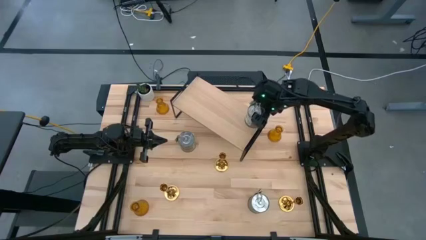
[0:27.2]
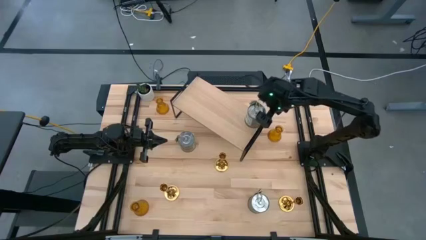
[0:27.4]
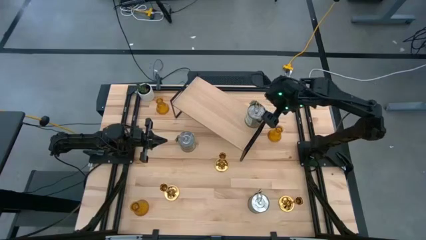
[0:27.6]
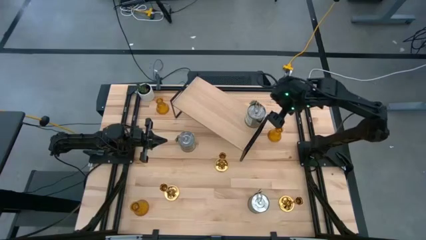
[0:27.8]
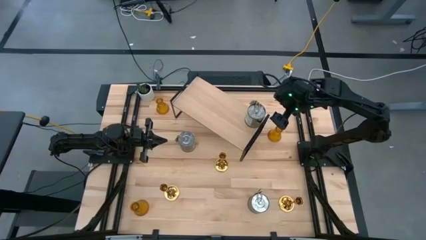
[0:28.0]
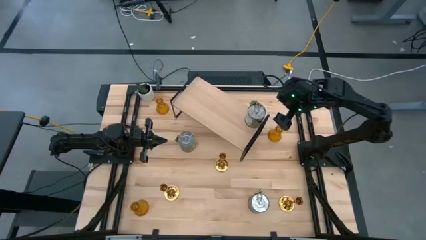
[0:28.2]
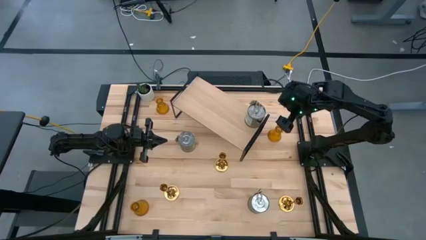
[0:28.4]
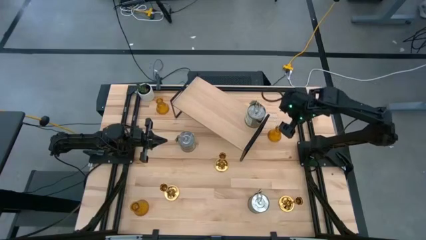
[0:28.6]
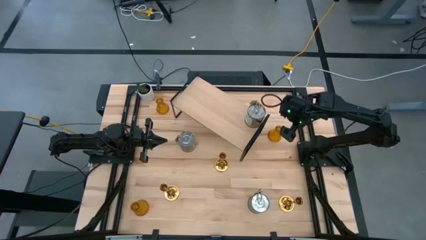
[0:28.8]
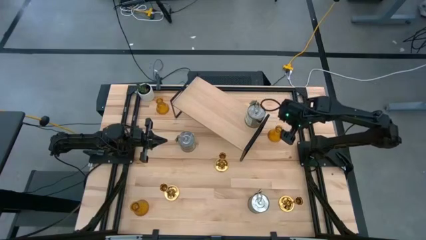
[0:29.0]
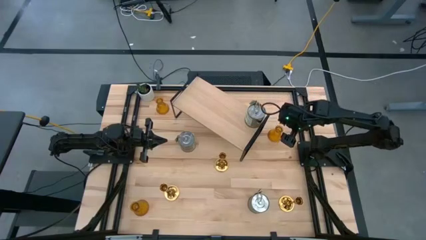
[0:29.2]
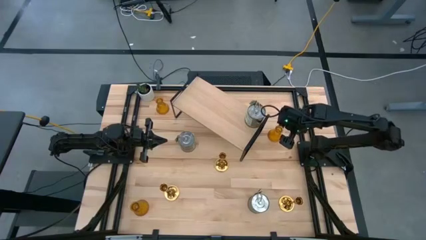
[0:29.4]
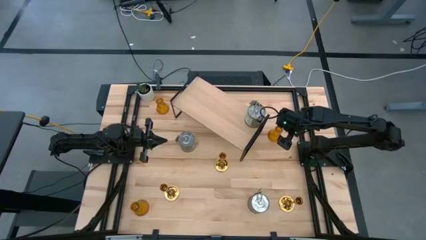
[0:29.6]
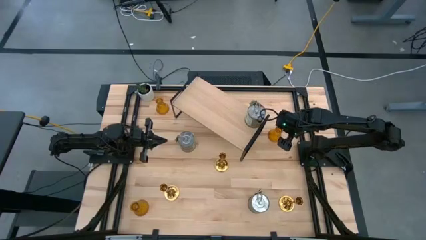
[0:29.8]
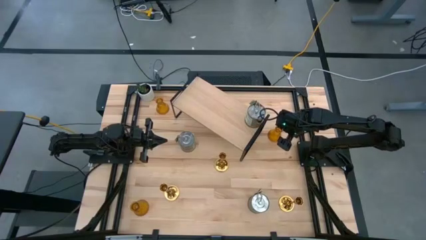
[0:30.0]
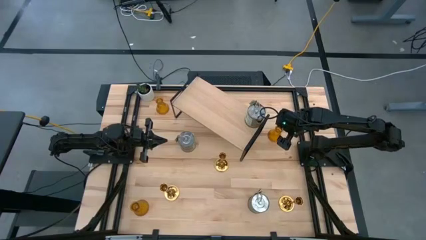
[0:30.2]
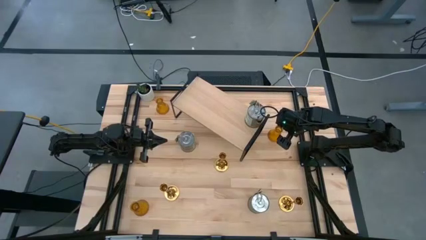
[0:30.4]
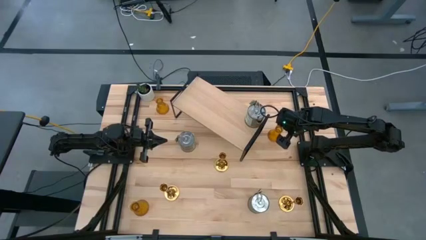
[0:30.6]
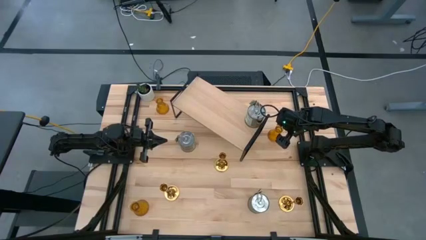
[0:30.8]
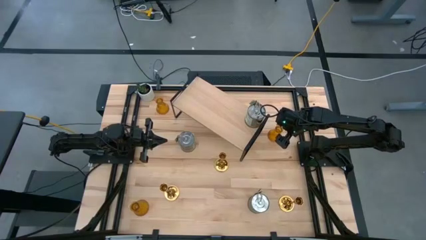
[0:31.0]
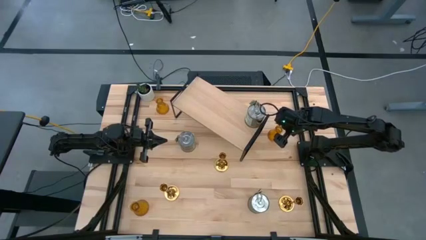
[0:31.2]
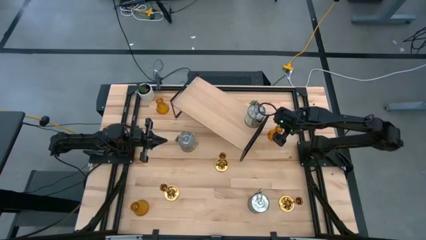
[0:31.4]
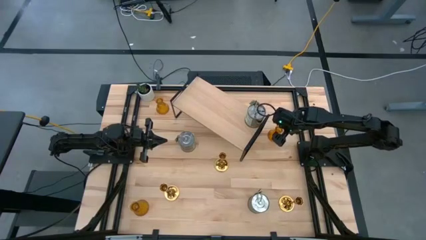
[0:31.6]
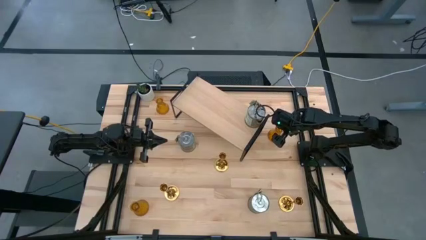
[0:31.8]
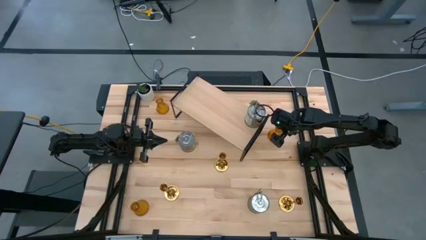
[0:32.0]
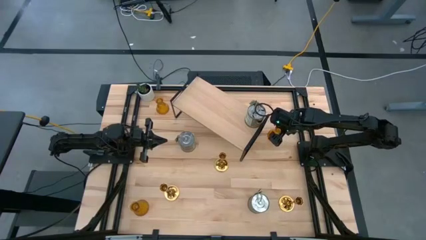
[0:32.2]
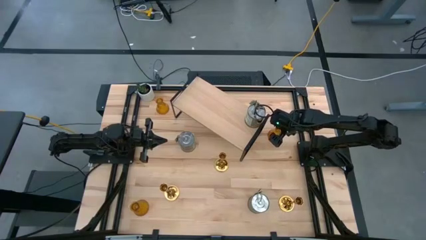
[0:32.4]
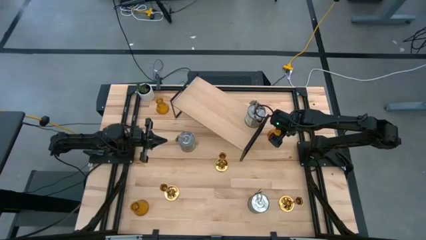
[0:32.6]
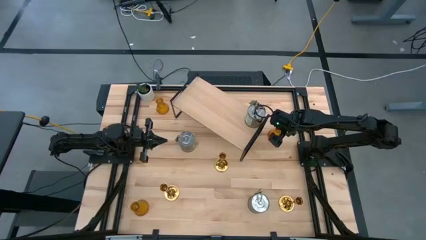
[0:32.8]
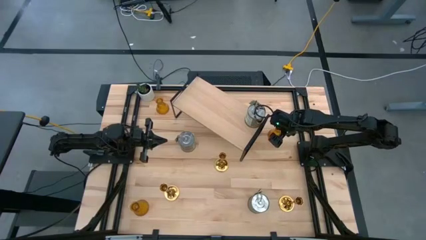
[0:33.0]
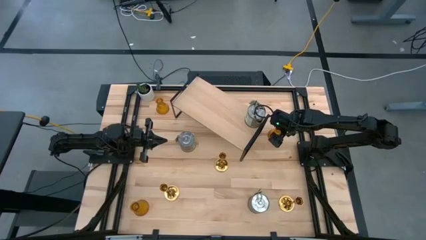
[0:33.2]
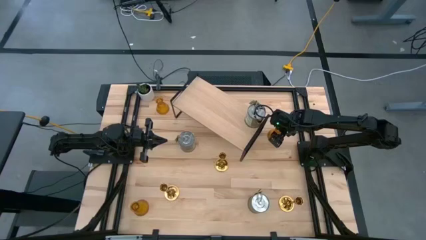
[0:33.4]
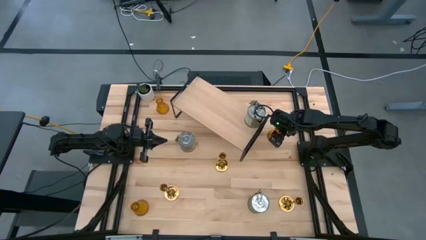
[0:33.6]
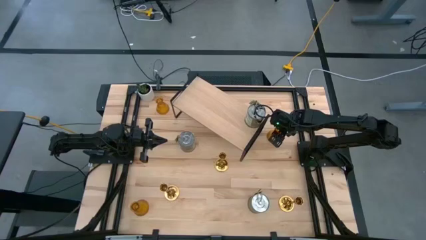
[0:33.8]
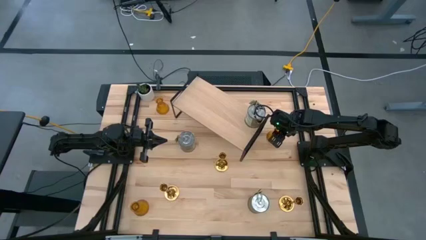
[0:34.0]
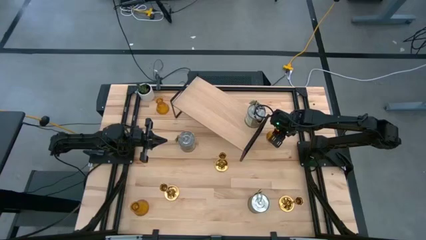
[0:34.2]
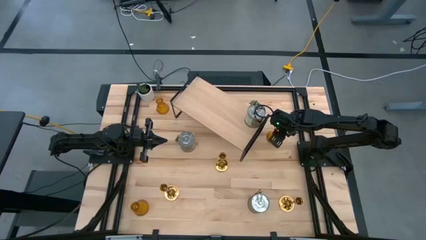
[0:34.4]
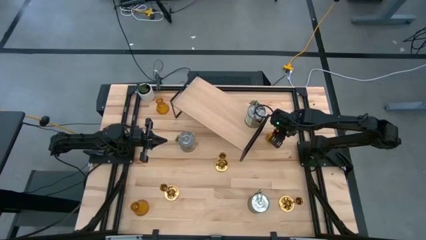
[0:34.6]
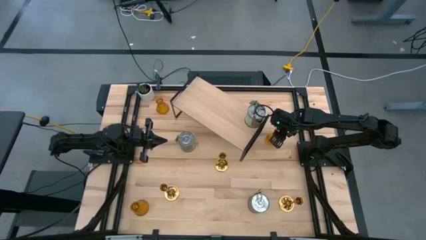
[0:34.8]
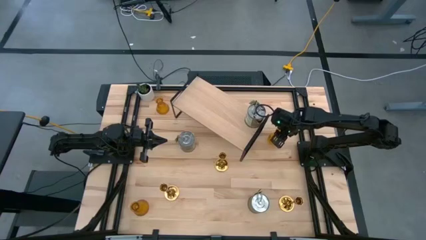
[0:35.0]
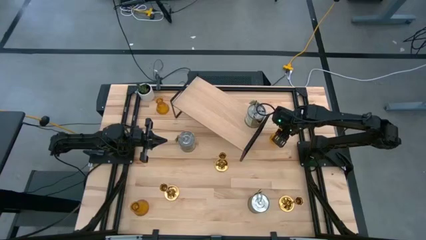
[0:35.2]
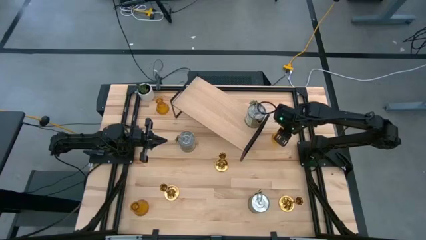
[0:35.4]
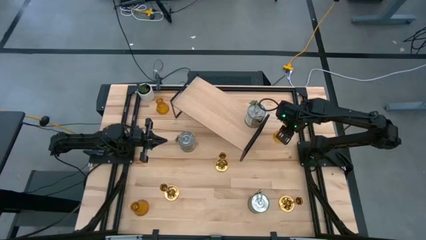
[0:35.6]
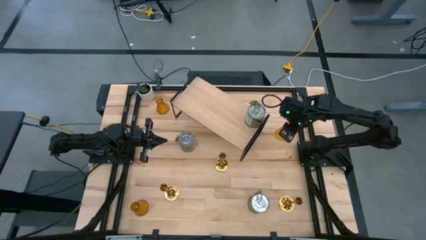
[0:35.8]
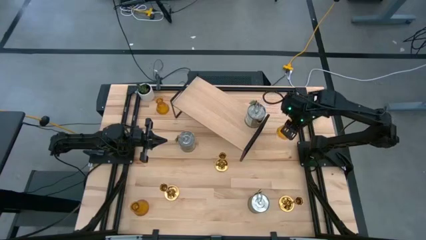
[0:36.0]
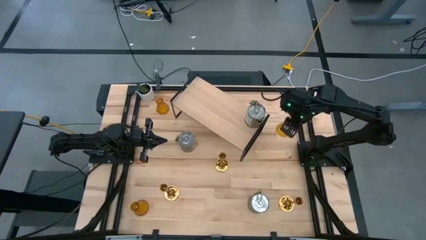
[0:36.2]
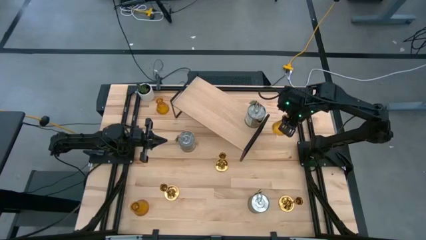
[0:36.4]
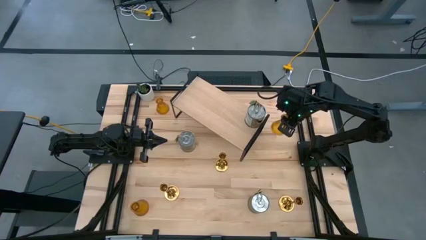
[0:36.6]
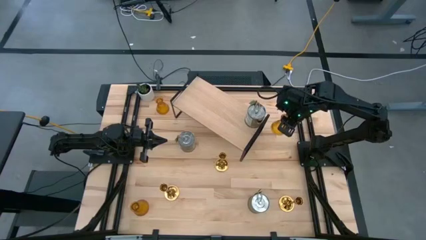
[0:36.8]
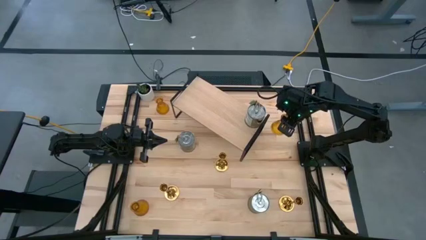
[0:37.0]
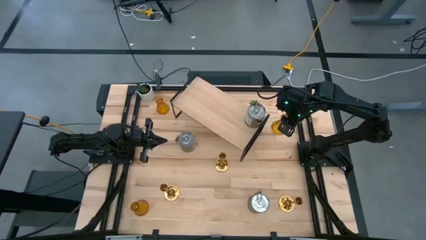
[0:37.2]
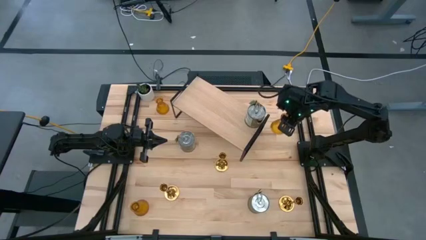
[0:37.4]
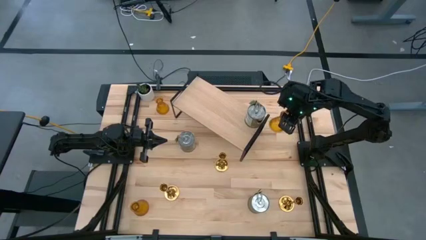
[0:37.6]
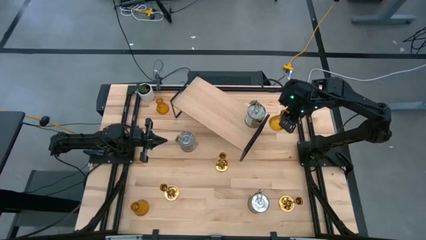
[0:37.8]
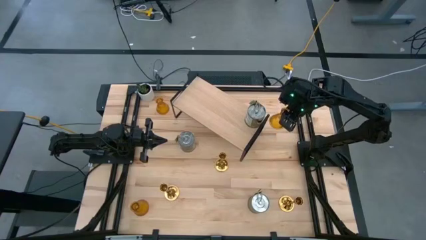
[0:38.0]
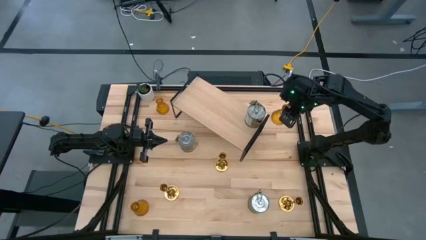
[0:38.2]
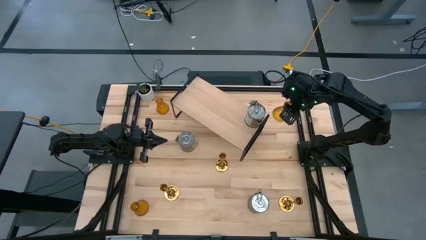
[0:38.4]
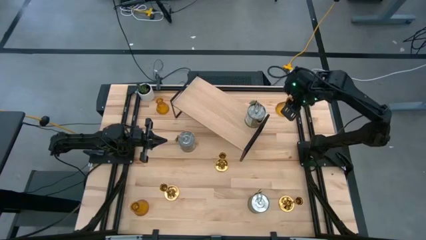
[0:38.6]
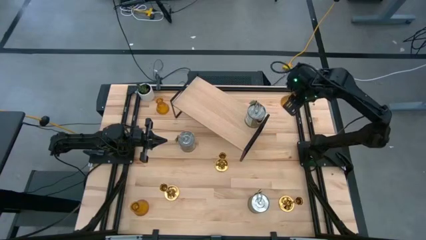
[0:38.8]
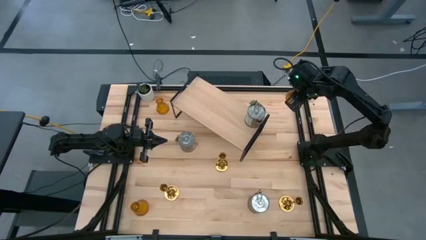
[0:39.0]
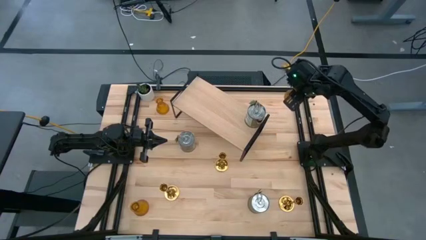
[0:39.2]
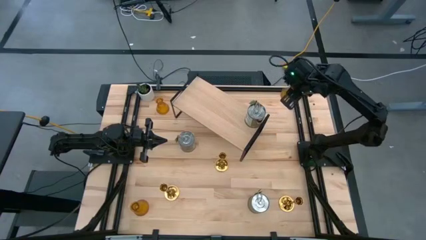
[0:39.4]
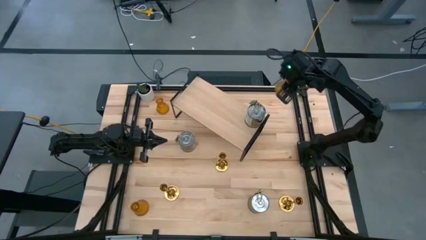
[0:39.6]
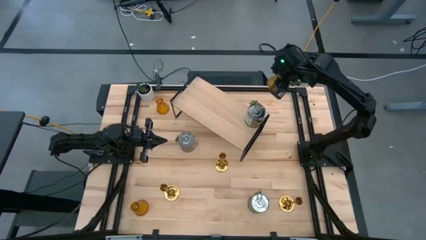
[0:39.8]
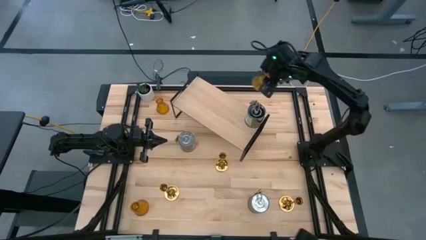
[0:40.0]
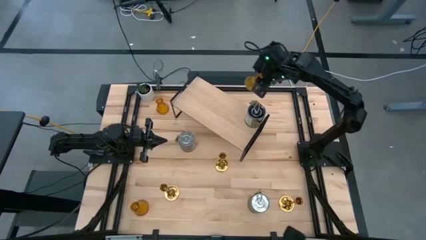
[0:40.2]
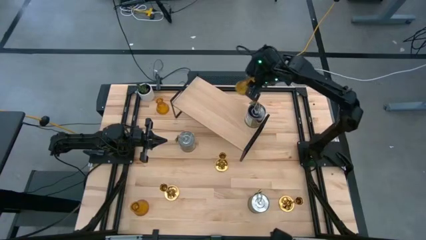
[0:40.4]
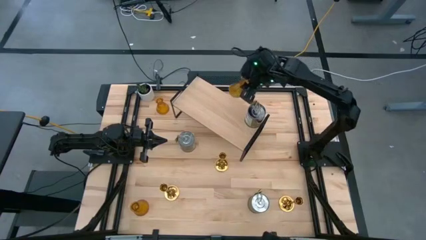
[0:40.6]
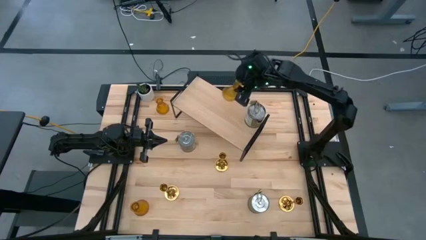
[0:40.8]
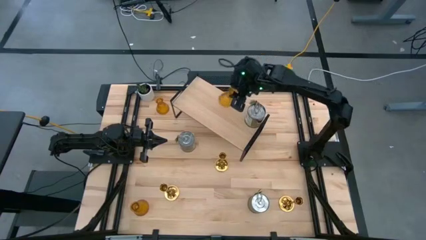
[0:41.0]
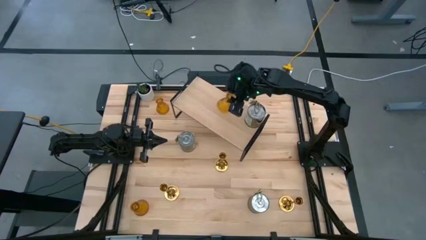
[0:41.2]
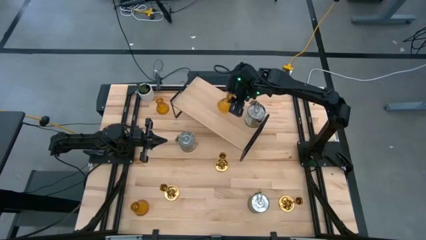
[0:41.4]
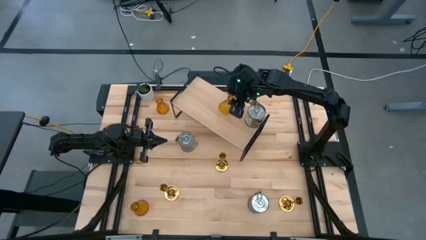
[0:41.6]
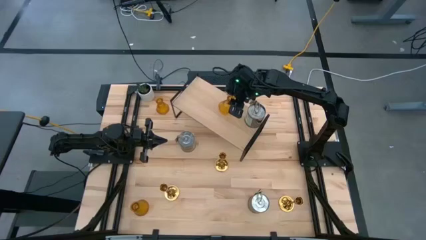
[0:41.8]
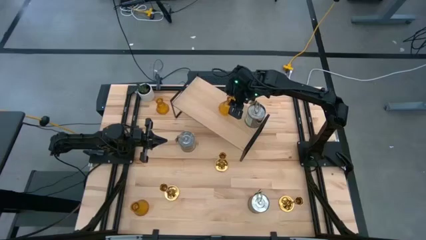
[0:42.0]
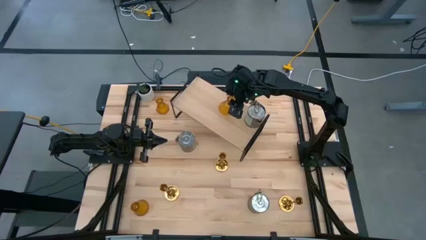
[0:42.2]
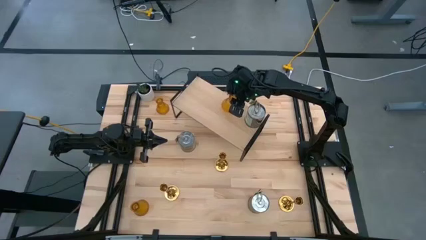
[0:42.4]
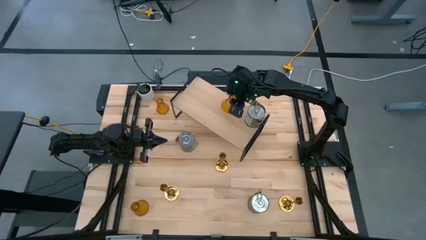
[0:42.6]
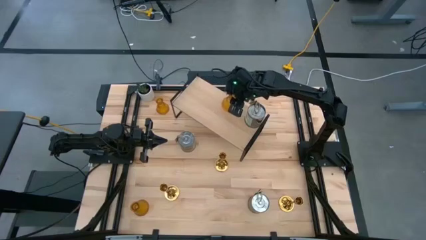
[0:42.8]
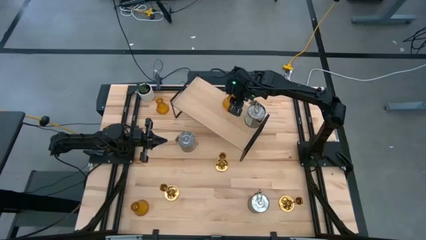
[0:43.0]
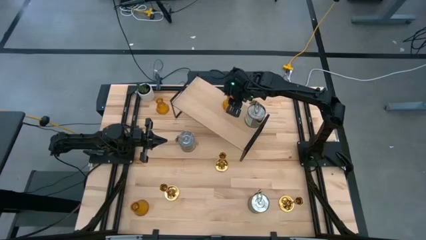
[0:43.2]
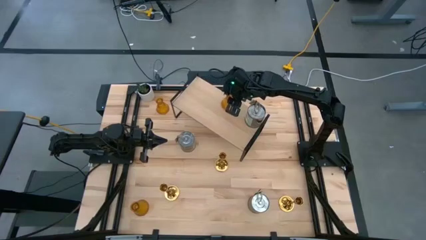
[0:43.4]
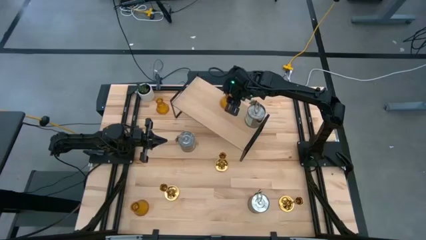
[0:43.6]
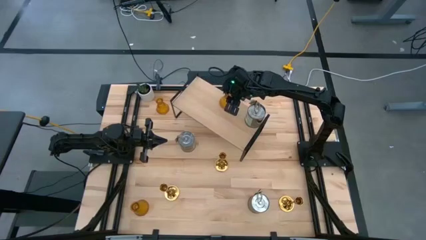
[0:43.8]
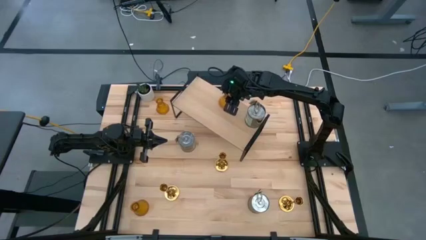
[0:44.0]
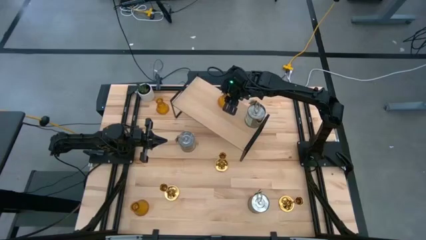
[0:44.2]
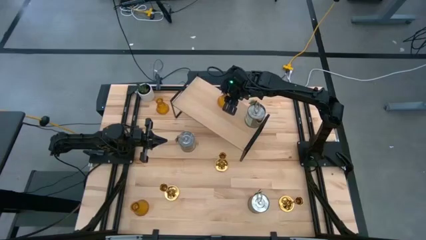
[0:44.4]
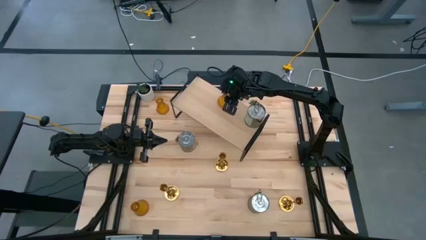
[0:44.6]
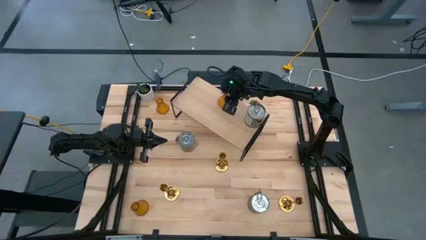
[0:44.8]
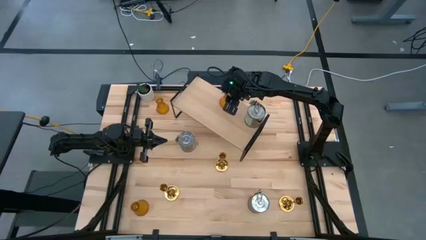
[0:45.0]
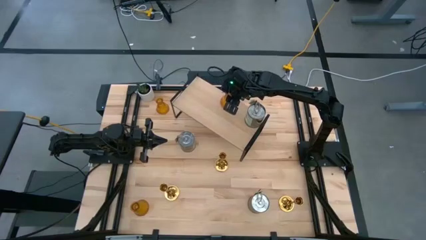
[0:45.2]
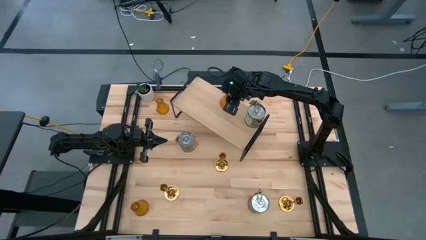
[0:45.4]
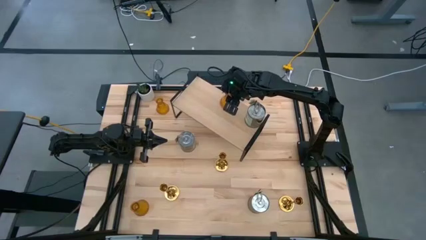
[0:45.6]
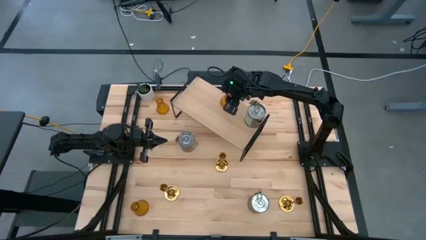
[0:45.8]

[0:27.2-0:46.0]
Task: Pick & Place candle stick holders
Put the top right yellow candle holder on the shelf
